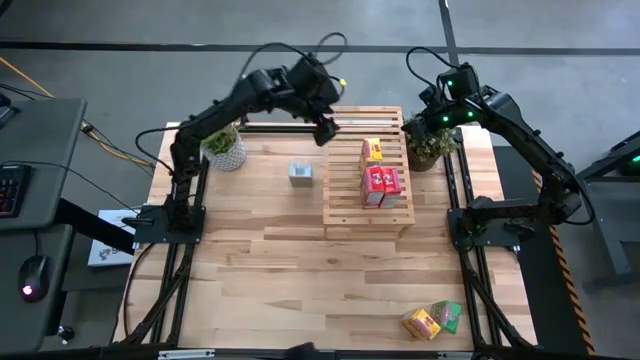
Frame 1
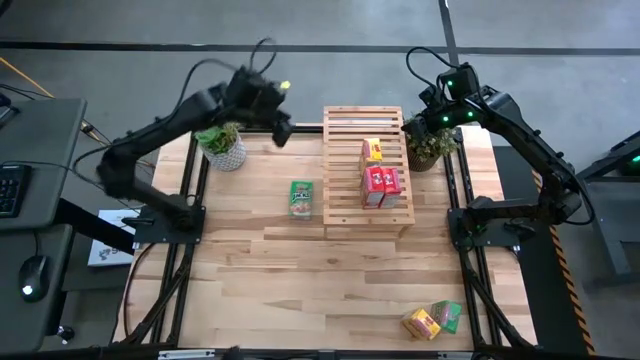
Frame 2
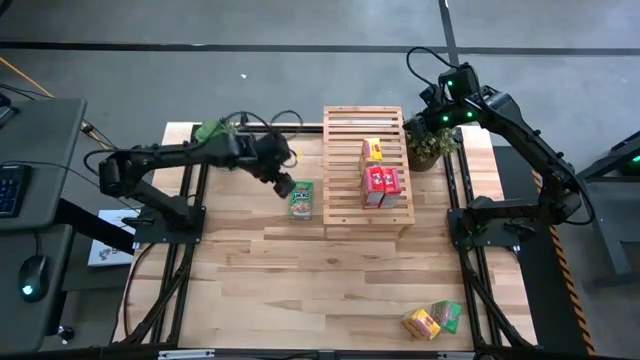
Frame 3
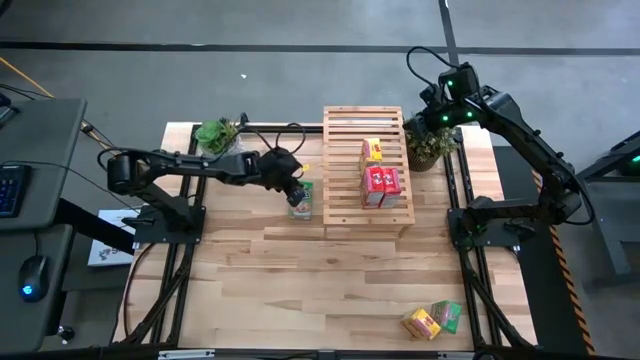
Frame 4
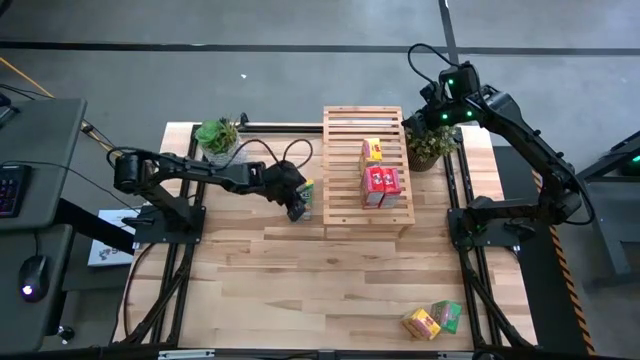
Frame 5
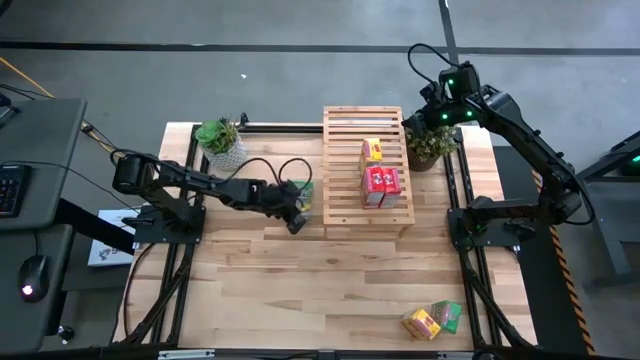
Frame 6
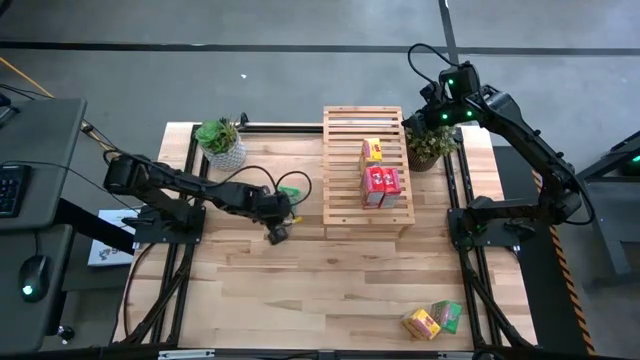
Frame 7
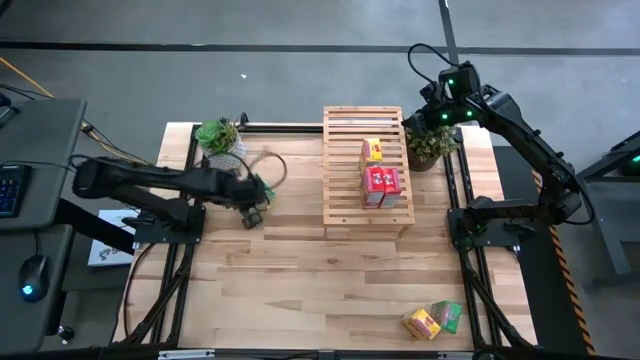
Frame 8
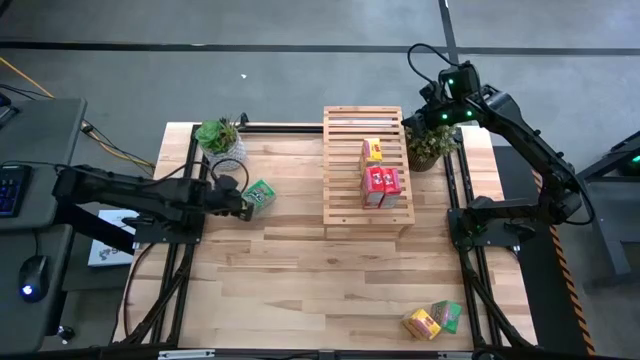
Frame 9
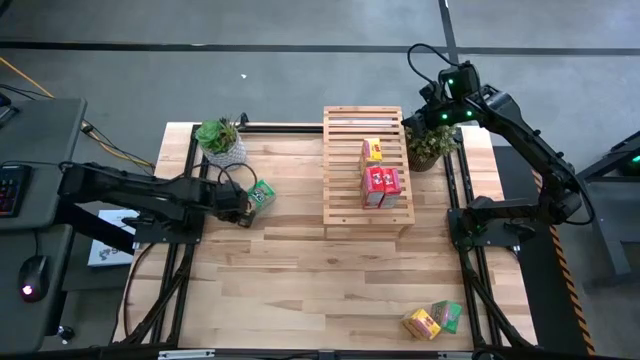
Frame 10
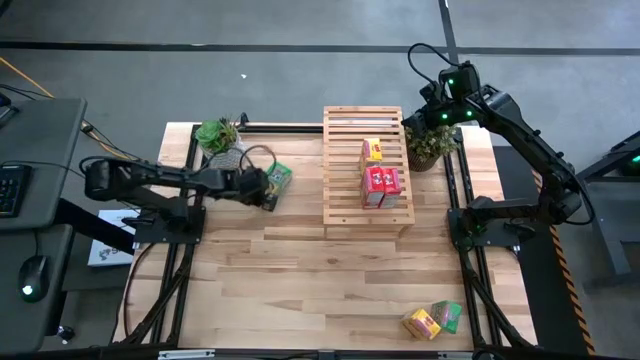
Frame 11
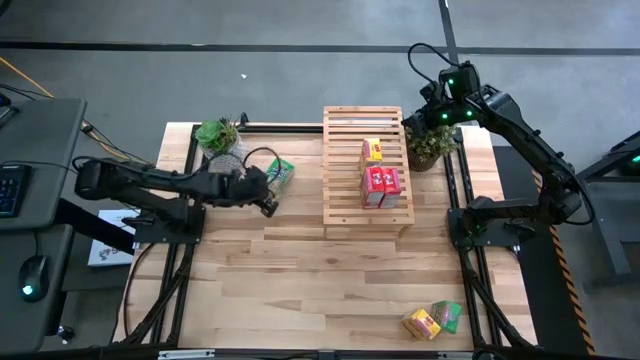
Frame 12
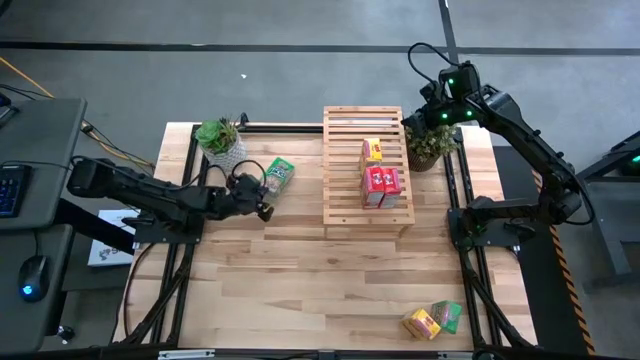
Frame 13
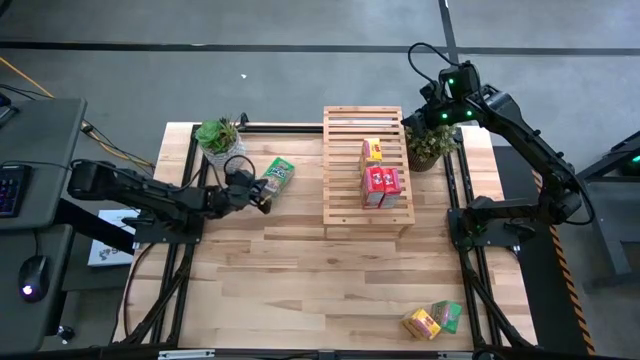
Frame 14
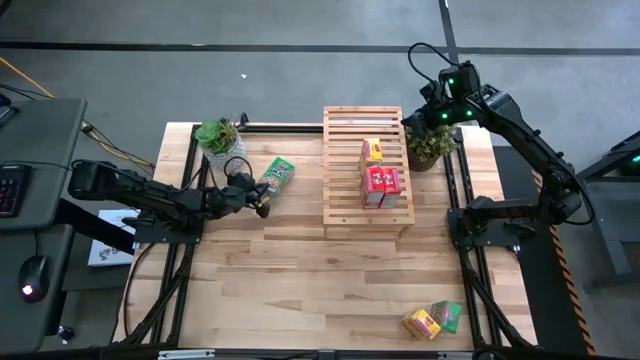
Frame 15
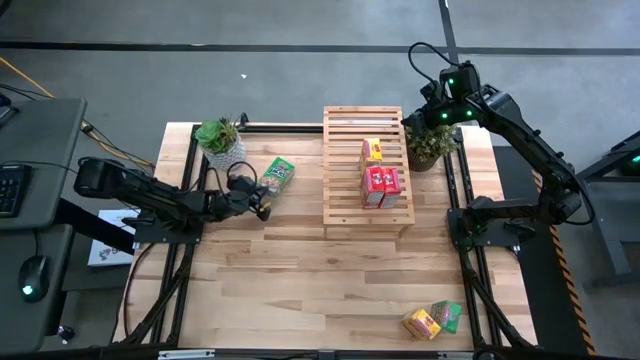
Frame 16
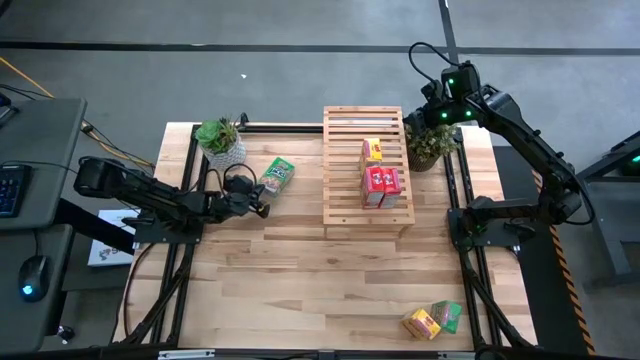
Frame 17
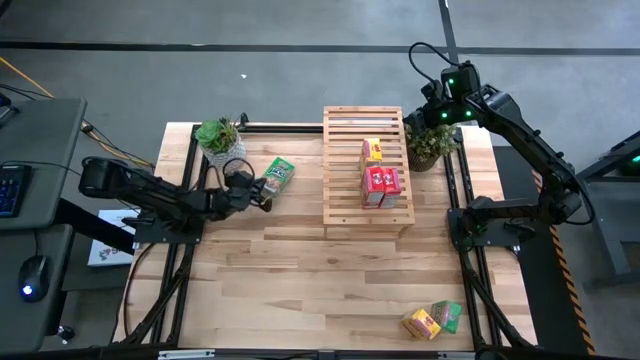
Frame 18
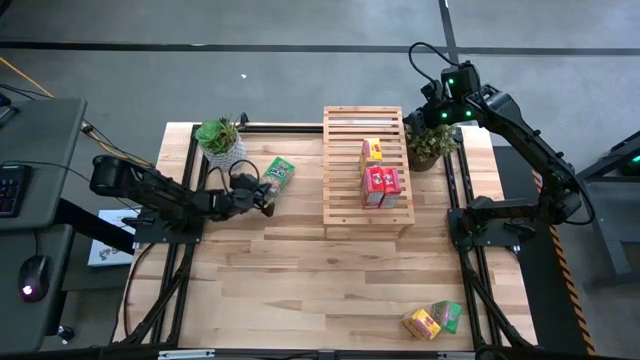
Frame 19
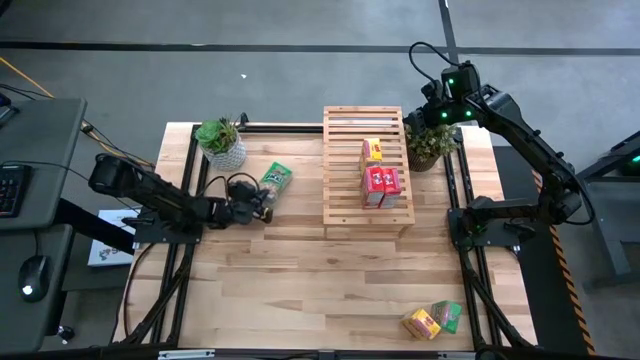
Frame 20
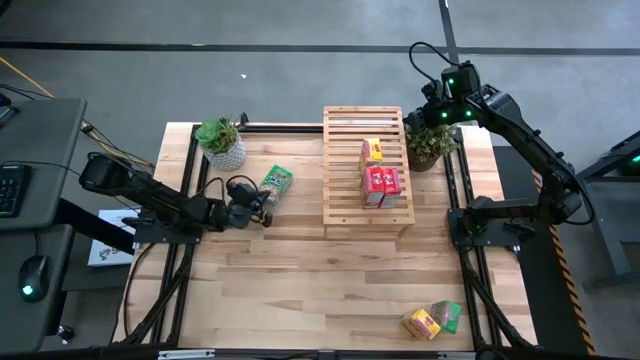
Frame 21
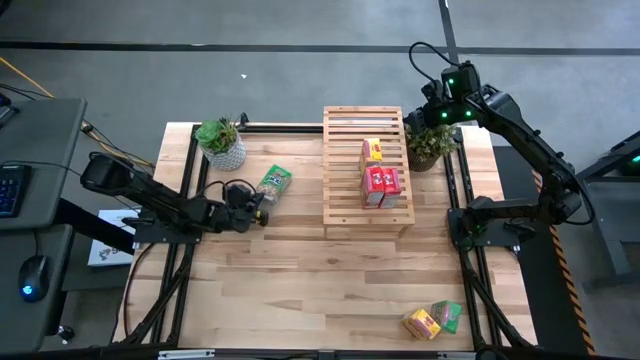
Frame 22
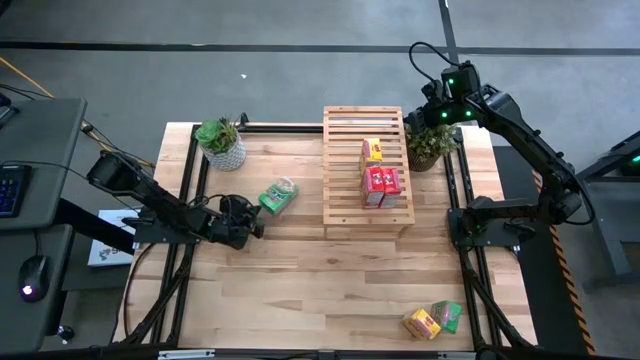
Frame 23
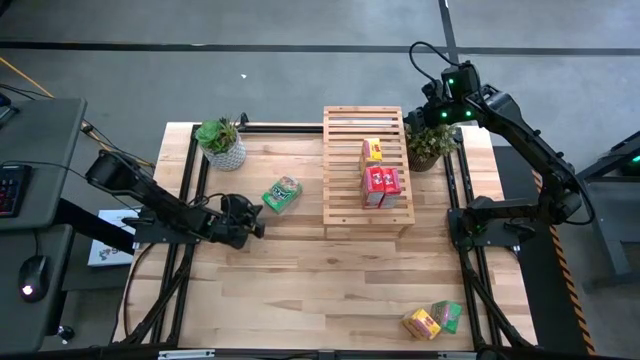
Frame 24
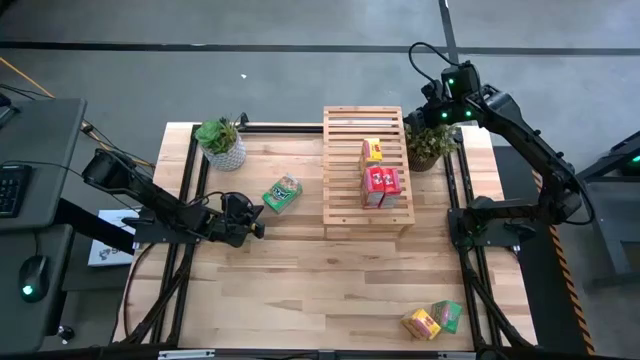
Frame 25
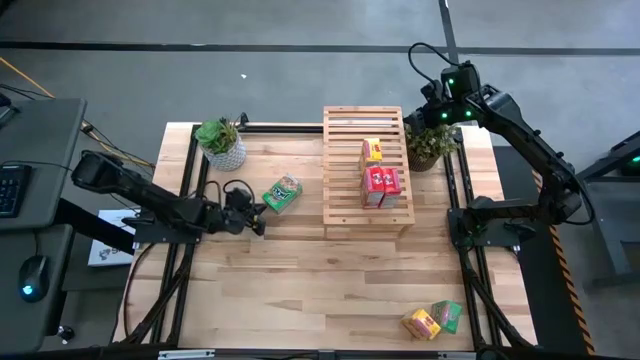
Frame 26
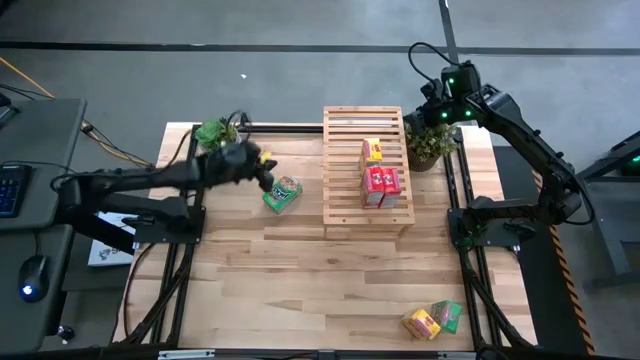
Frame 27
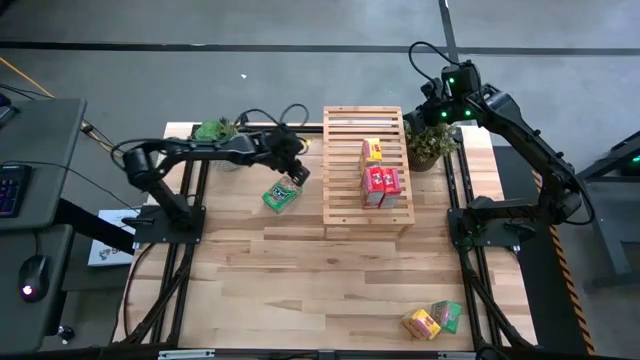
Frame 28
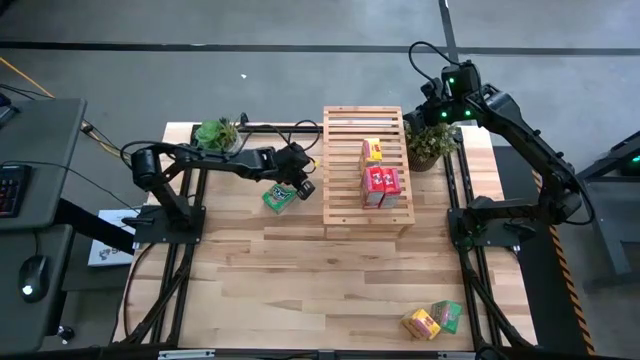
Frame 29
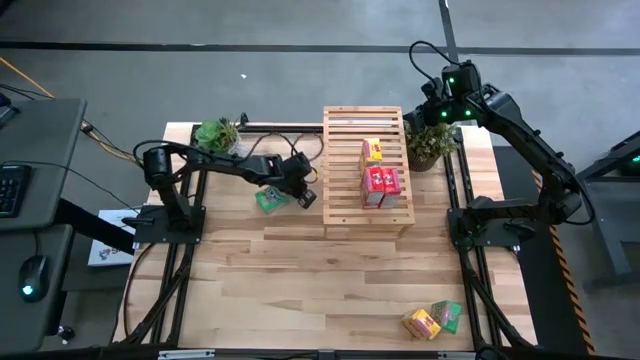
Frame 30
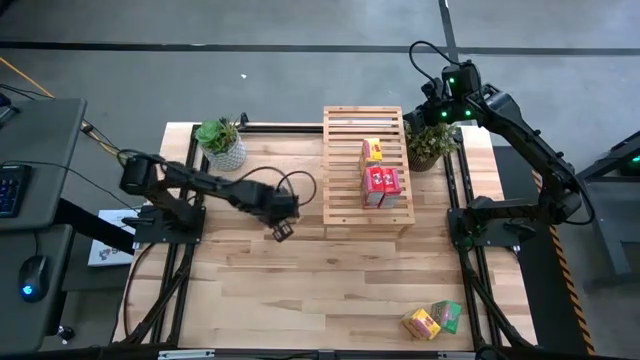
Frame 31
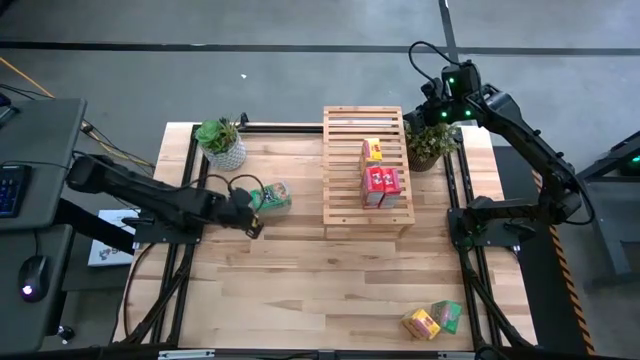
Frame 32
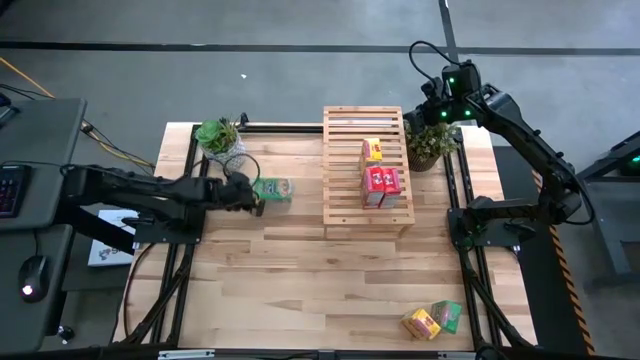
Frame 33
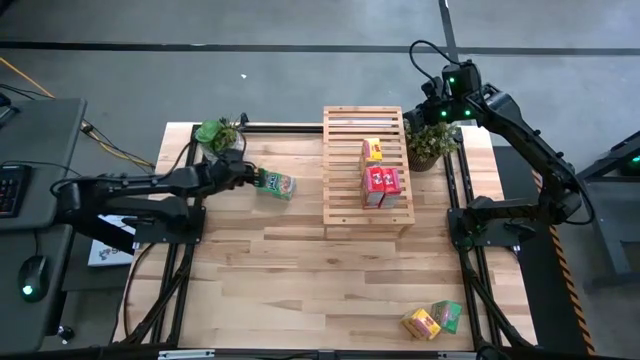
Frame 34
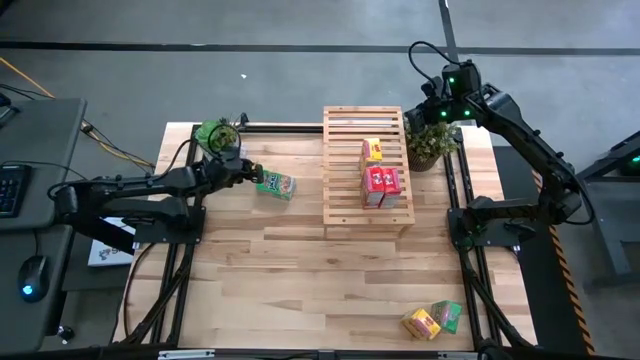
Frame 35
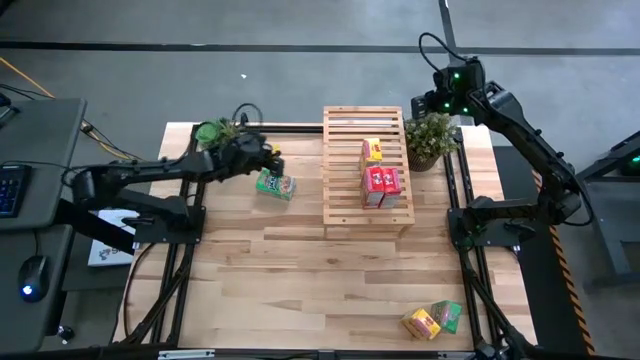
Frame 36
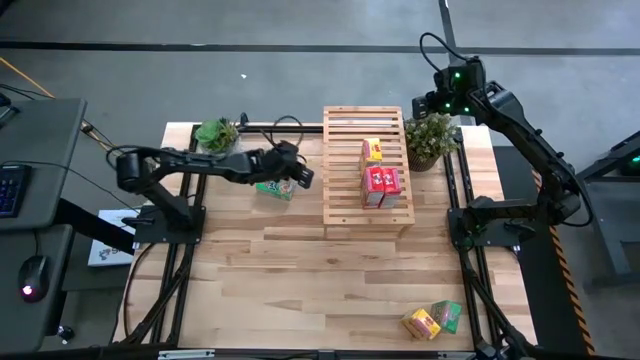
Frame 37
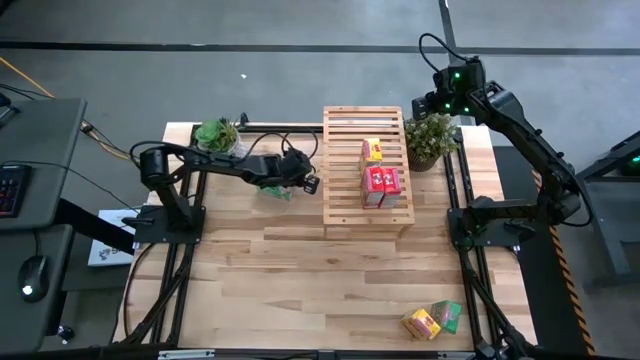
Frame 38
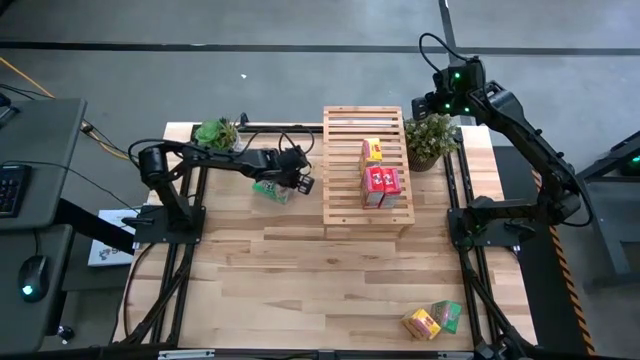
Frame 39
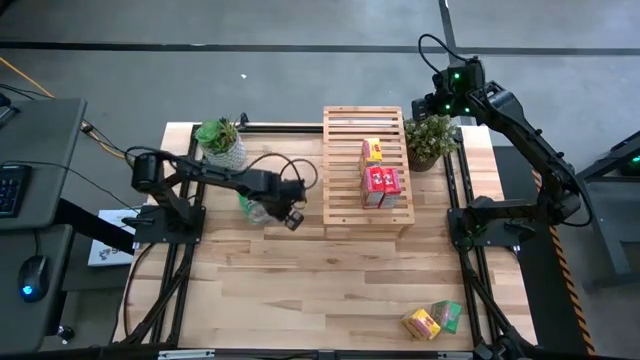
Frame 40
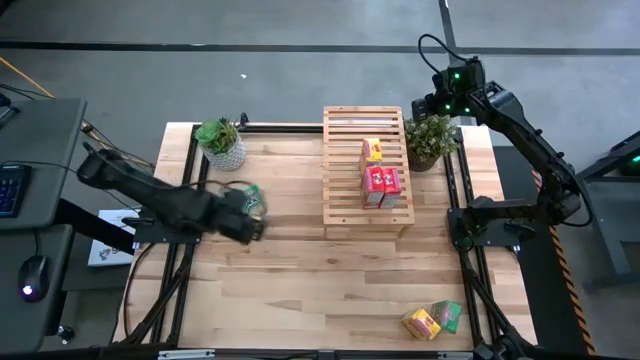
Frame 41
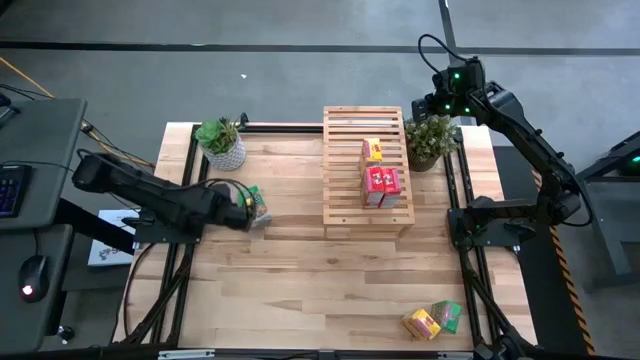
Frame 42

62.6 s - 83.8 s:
Task: Stack cereal on shelf
Put the top green cereal box on the shelf
